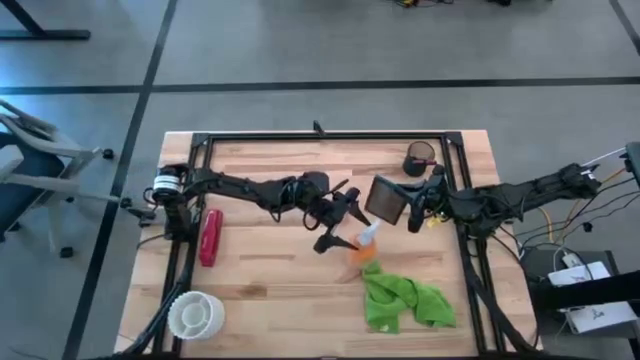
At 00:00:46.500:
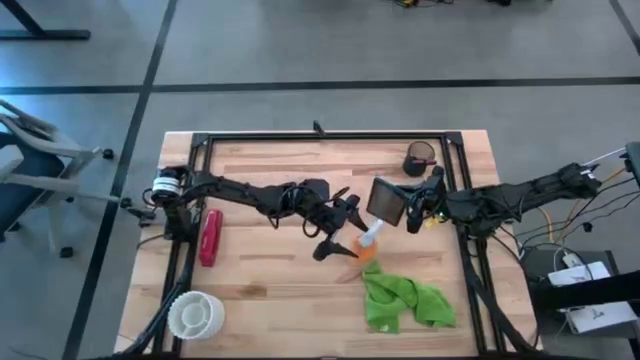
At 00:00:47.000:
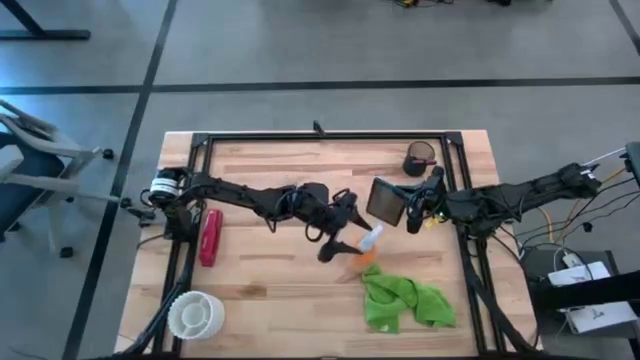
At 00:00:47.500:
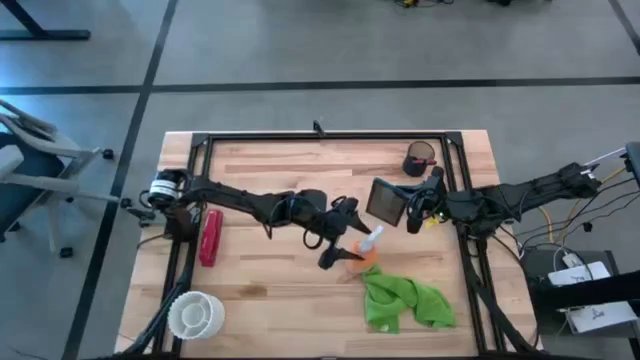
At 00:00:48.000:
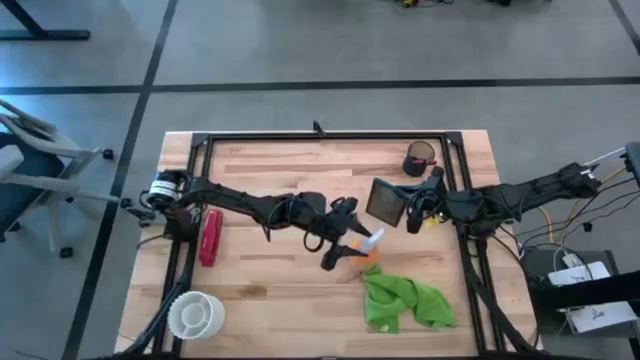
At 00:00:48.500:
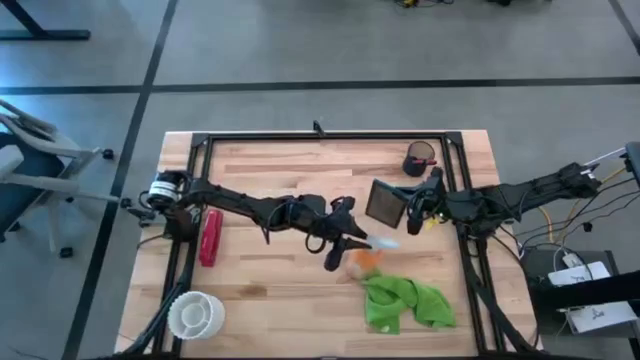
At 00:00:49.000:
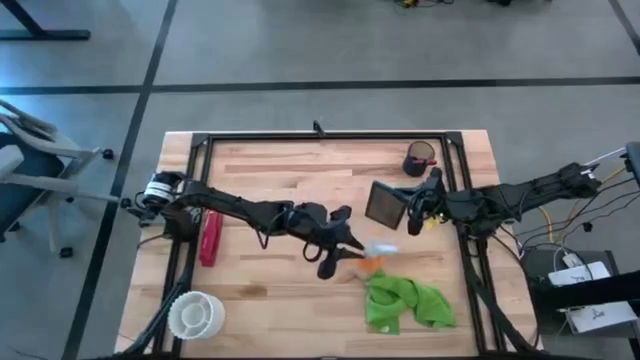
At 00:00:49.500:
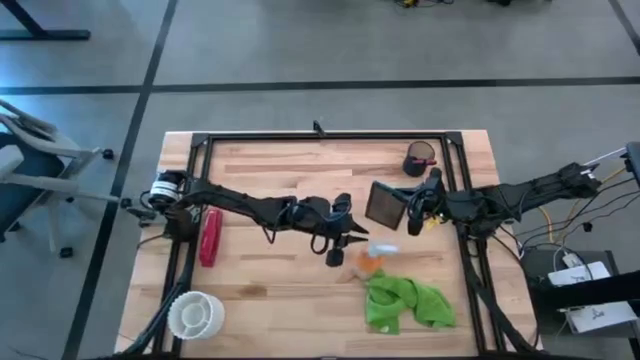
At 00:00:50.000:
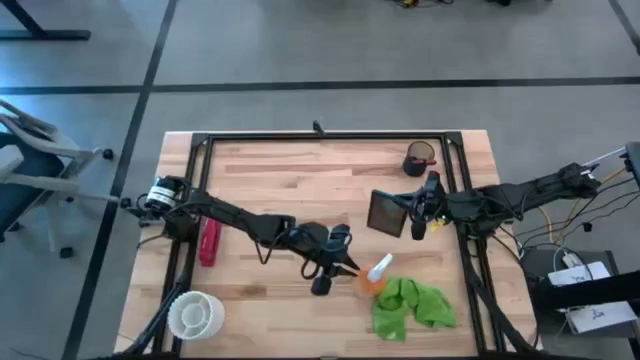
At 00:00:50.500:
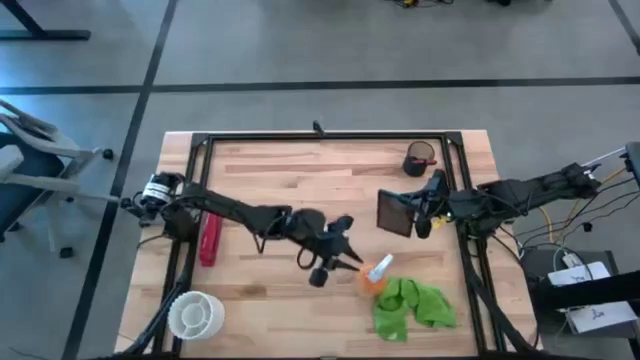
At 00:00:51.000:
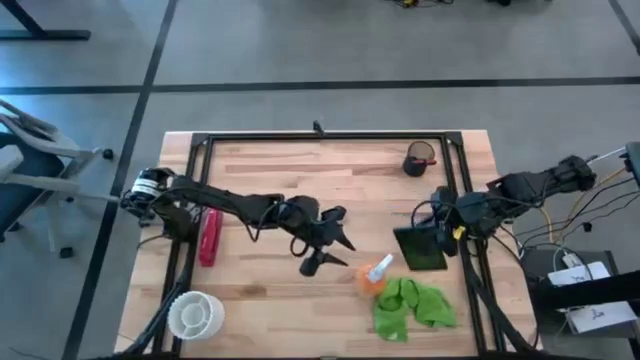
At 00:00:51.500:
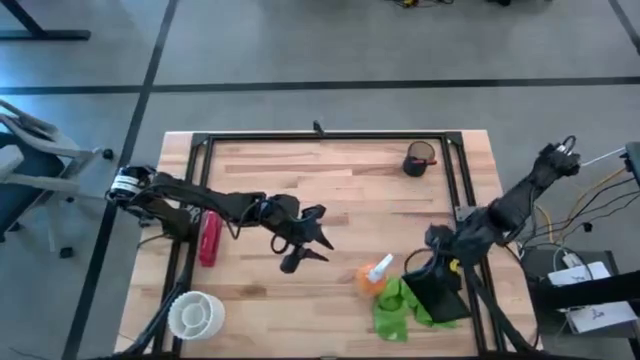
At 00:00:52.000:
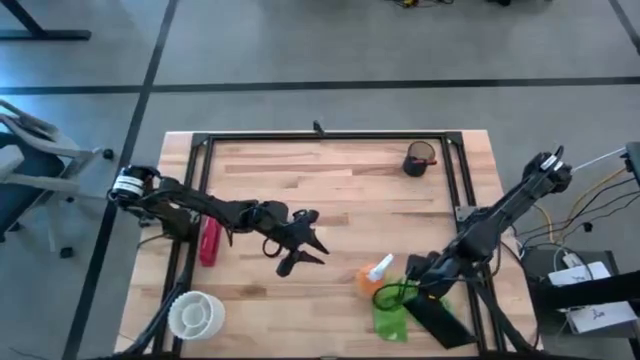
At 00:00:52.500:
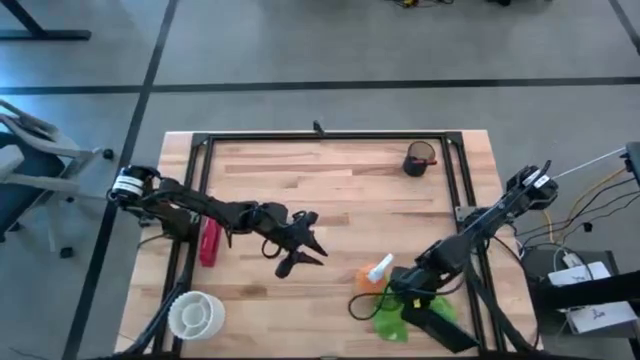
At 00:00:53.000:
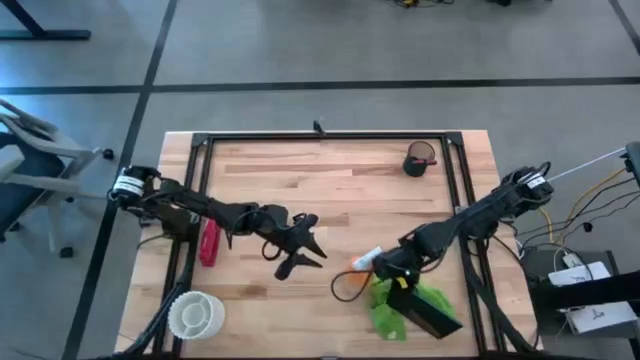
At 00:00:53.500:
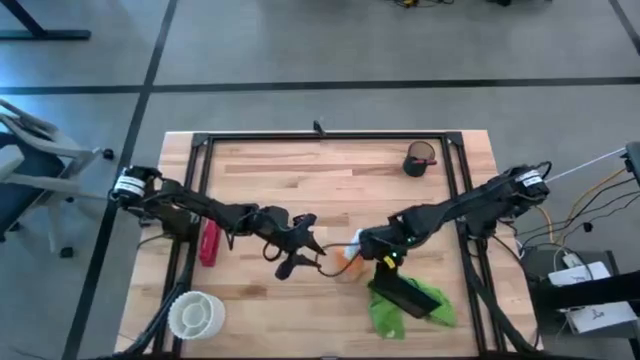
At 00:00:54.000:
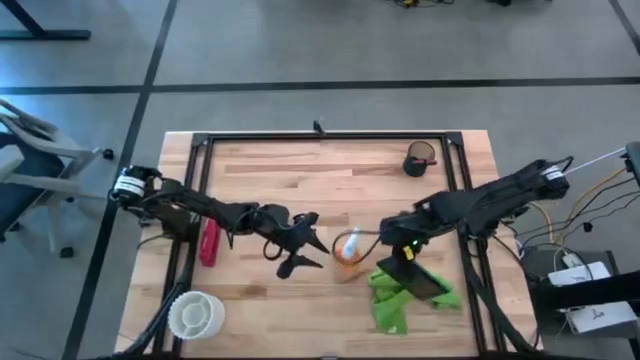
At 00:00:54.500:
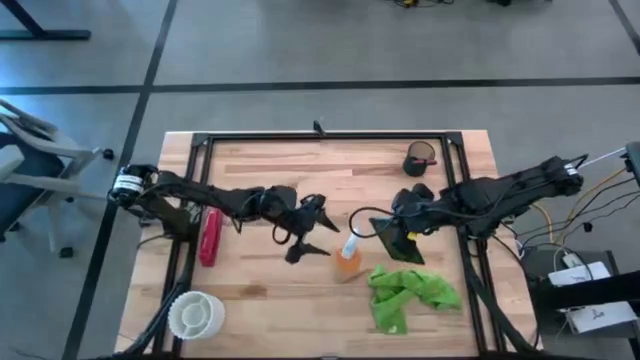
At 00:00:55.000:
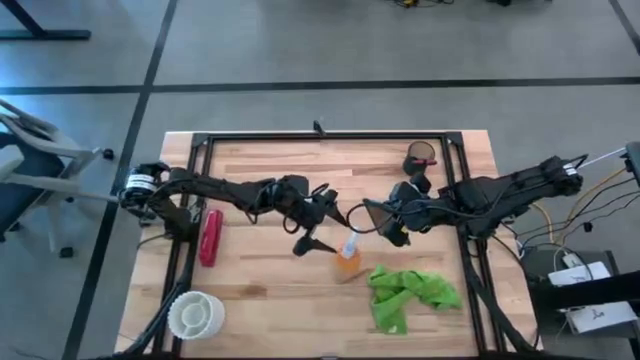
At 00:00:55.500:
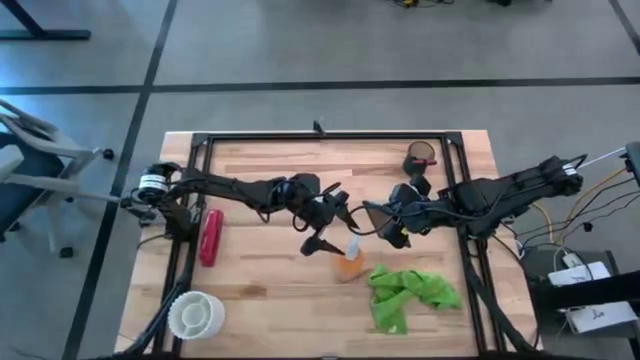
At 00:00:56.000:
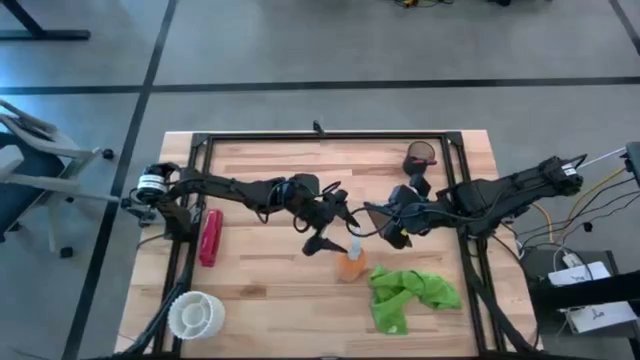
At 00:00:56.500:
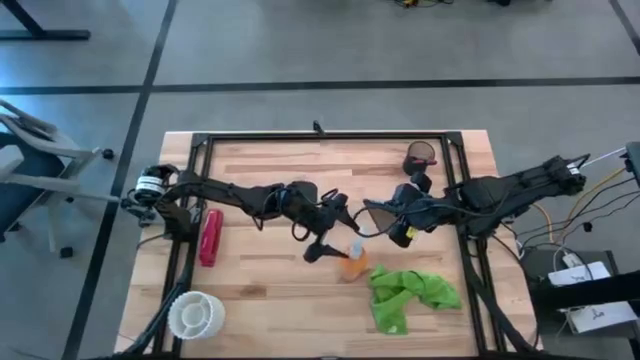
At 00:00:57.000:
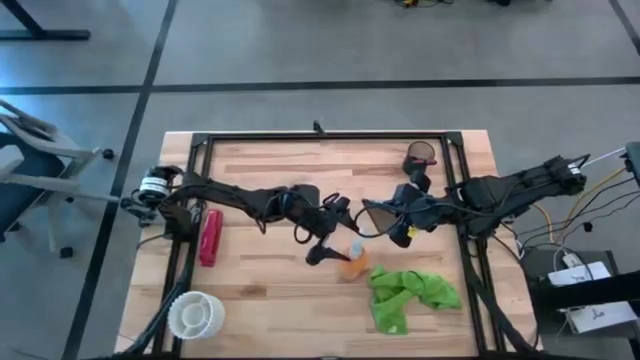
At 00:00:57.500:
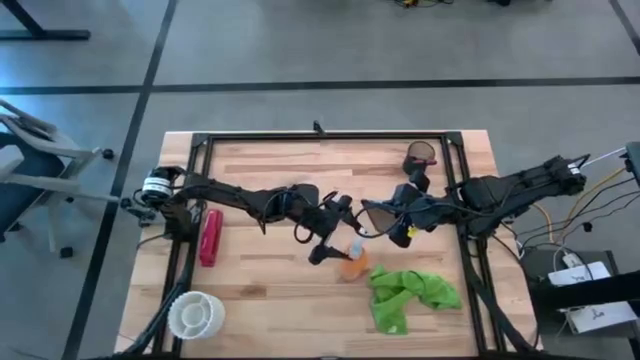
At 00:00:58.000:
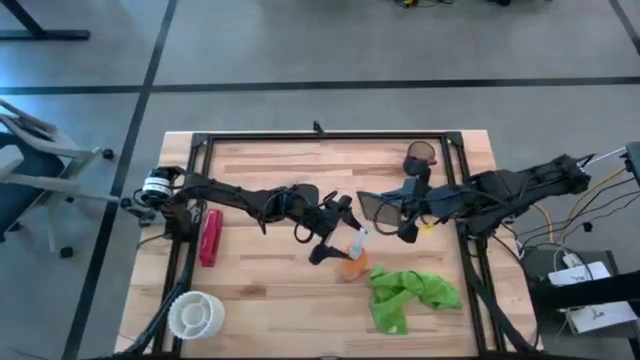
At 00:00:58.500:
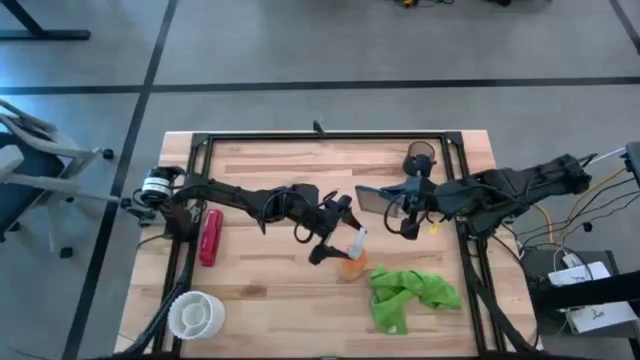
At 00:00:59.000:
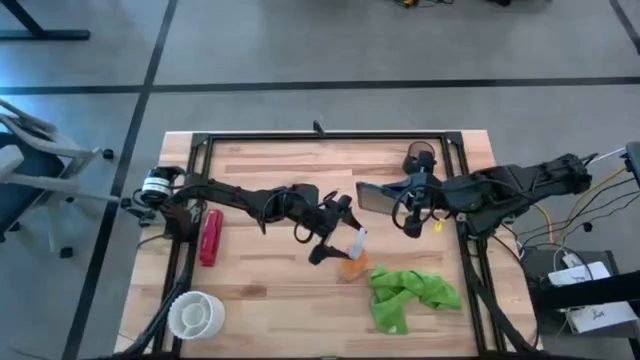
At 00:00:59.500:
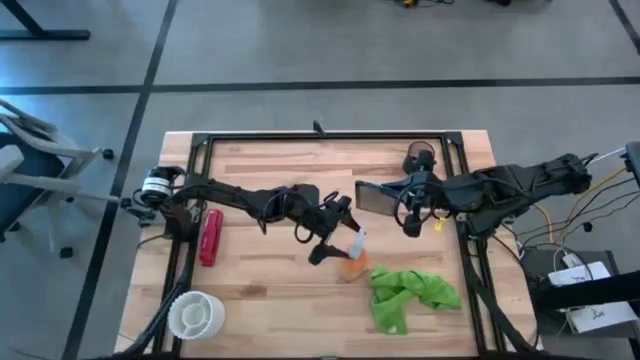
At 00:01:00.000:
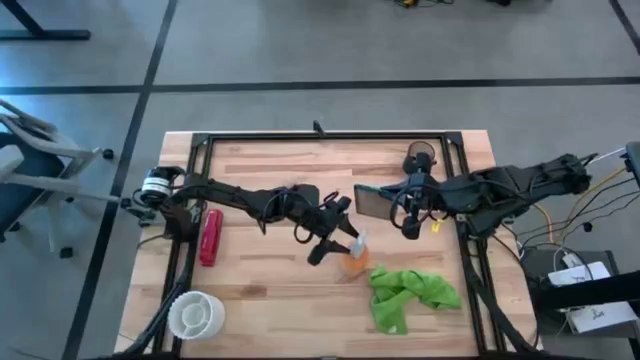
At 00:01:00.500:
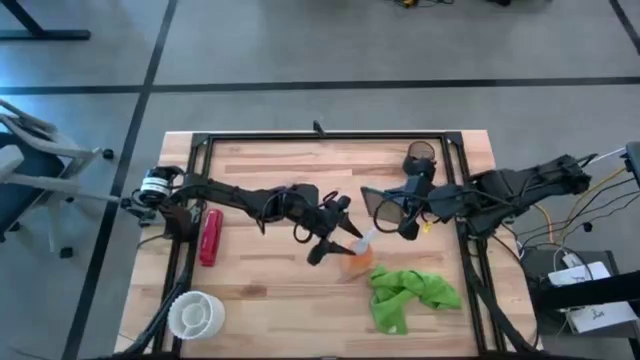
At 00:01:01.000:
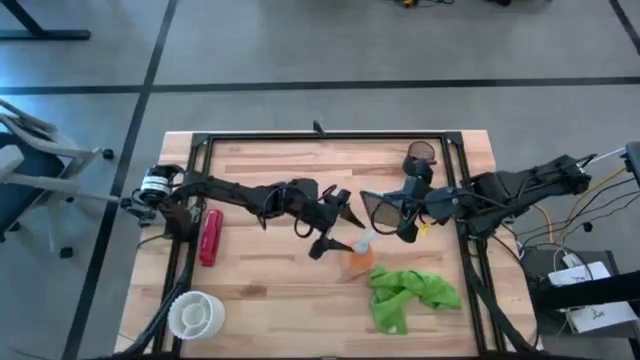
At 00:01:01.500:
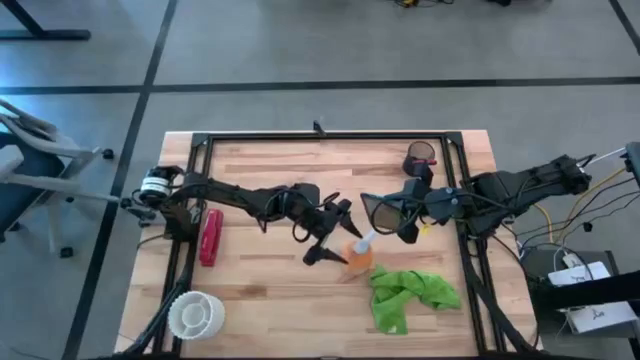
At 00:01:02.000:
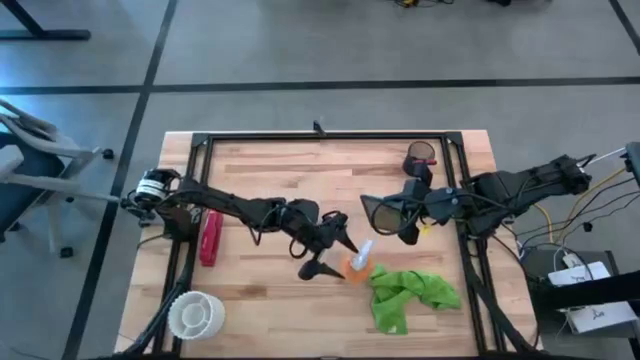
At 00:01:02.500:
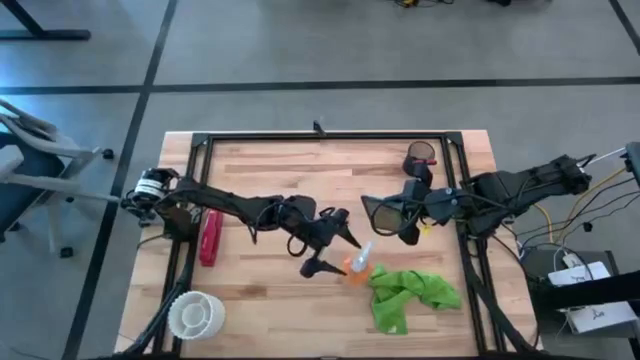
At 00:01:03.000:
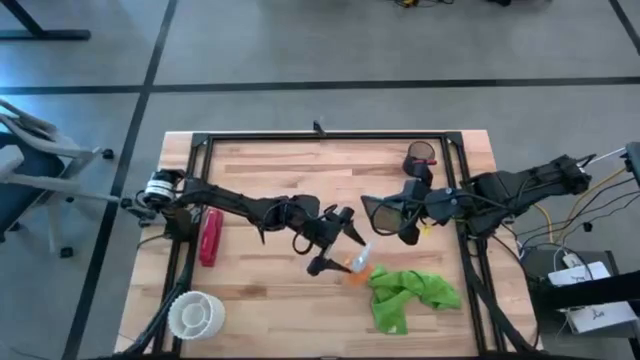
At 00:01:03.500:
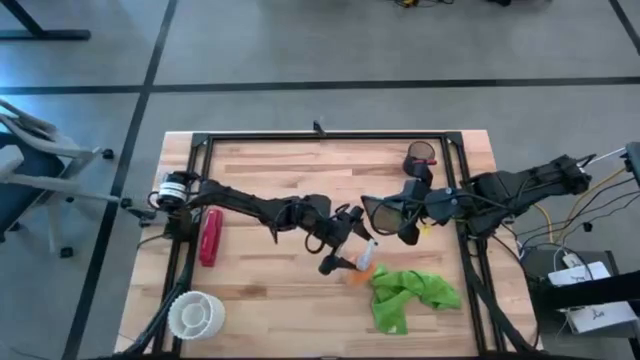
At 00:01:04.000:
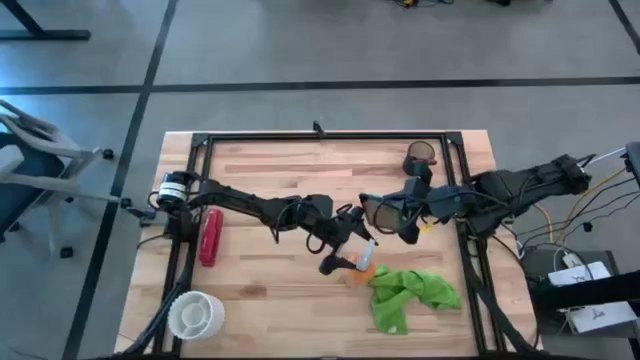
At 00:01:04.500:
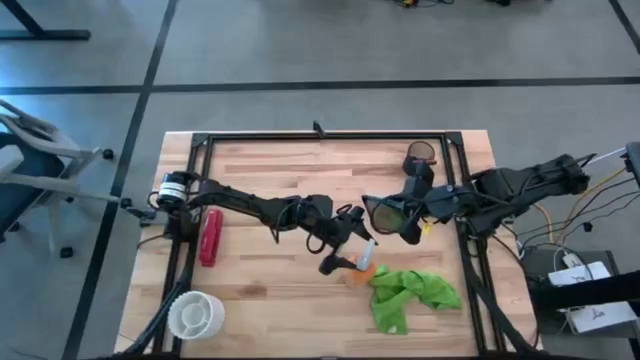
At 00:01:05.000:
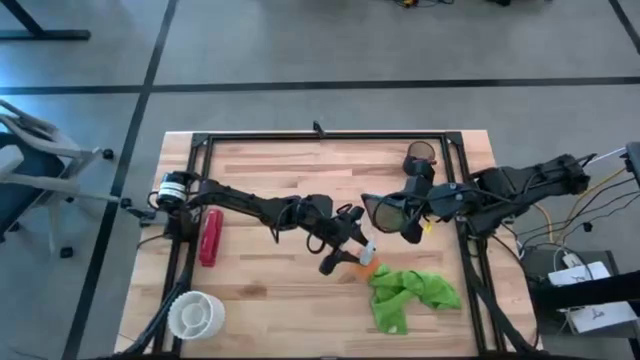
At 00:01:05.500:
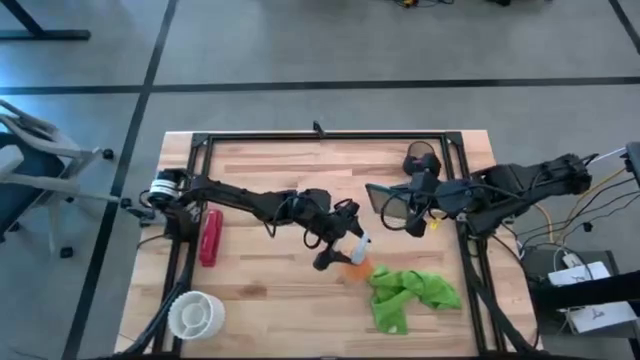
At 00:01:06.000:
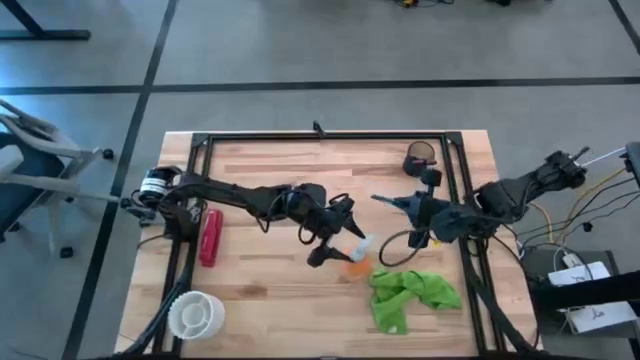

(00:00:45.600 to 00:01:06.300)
Task: Apply microfiber cloth
Spray the front screen of the blue cellphone with the yellow spray bottle
